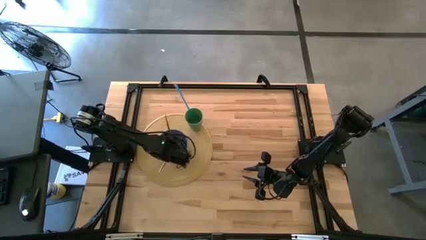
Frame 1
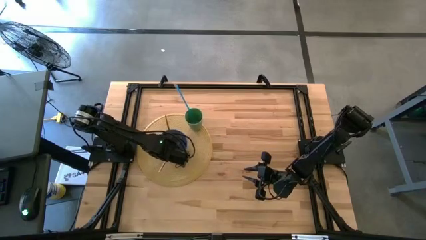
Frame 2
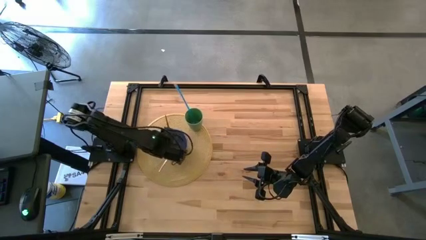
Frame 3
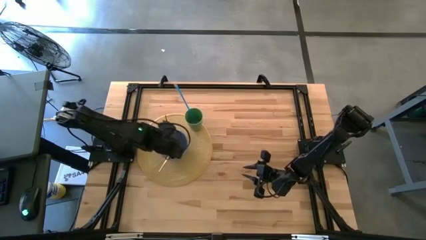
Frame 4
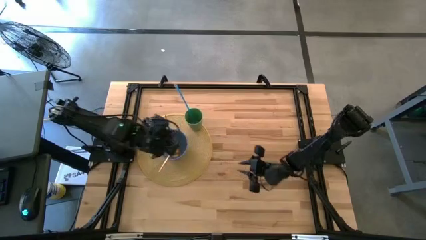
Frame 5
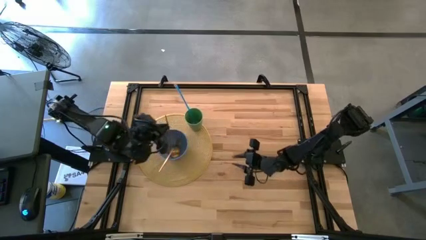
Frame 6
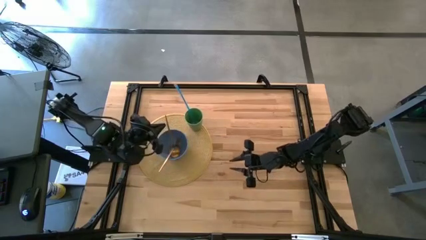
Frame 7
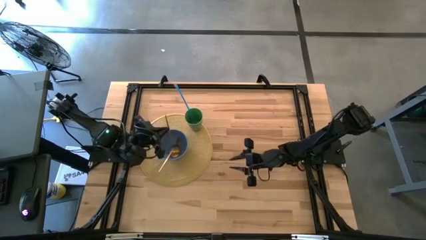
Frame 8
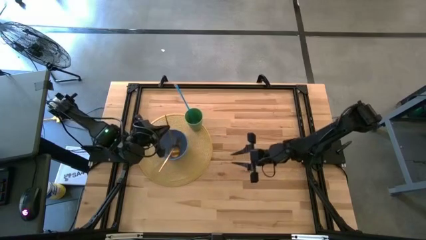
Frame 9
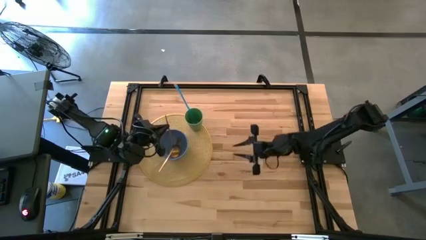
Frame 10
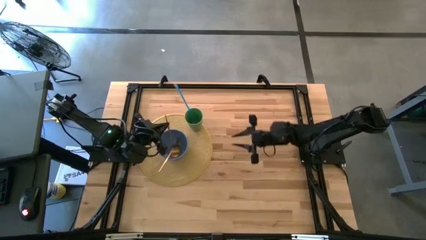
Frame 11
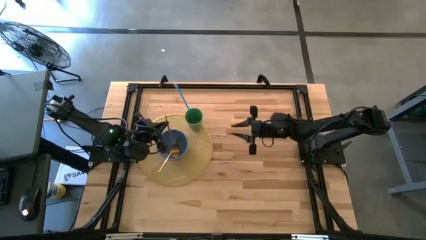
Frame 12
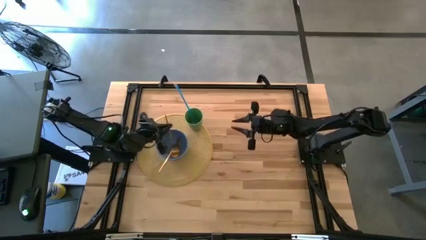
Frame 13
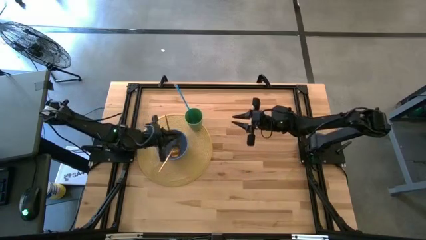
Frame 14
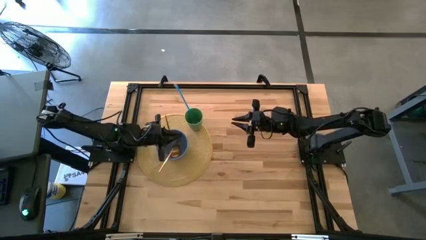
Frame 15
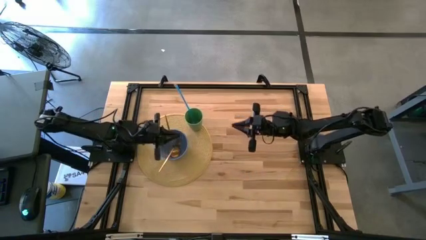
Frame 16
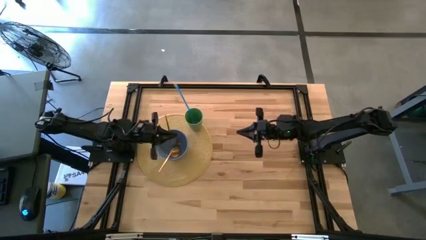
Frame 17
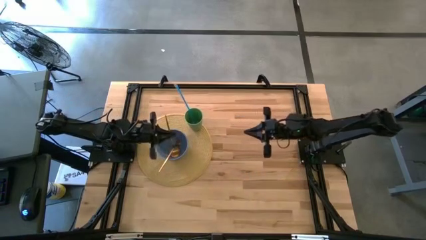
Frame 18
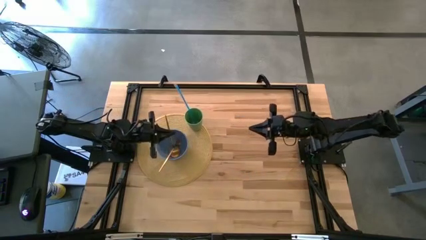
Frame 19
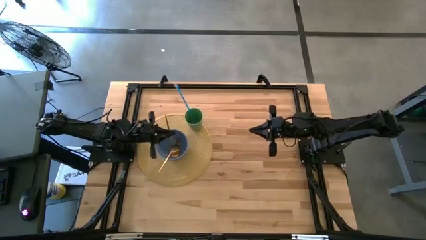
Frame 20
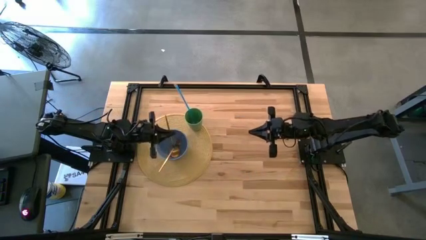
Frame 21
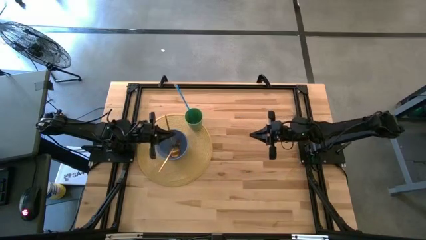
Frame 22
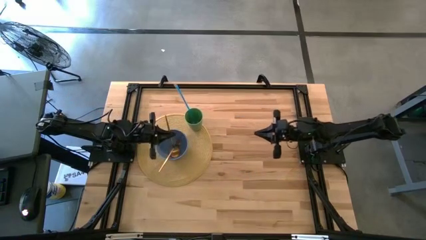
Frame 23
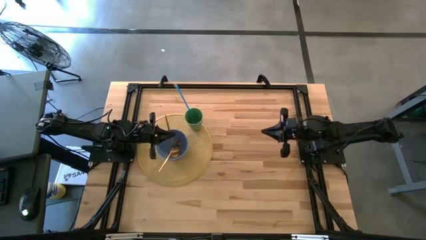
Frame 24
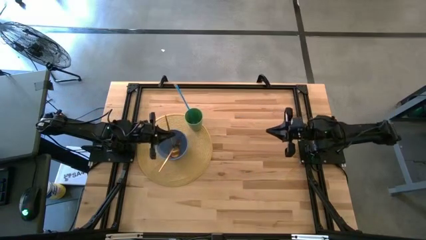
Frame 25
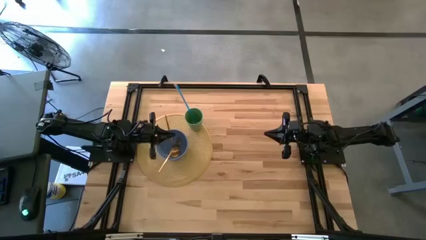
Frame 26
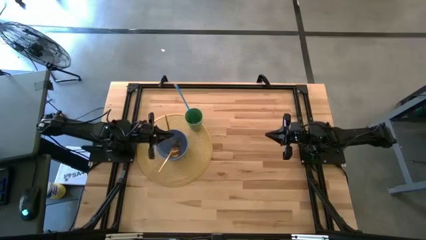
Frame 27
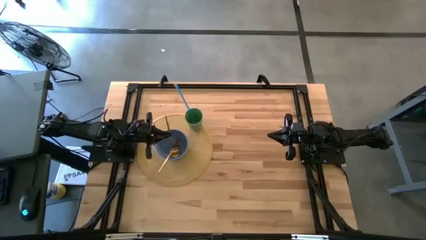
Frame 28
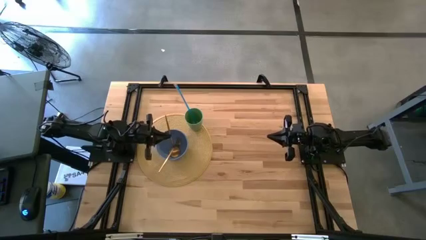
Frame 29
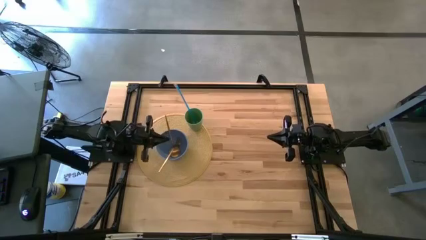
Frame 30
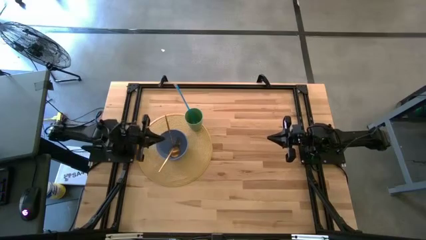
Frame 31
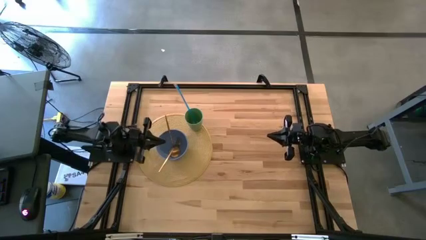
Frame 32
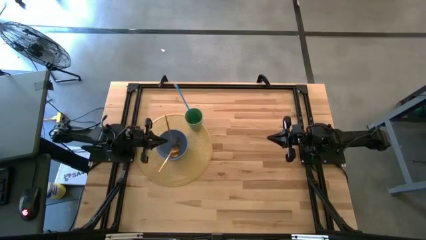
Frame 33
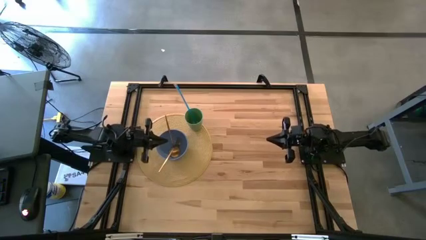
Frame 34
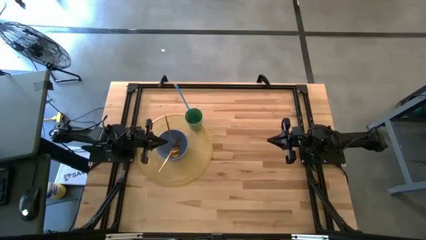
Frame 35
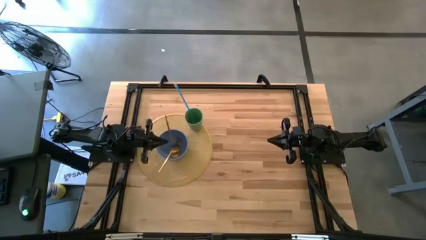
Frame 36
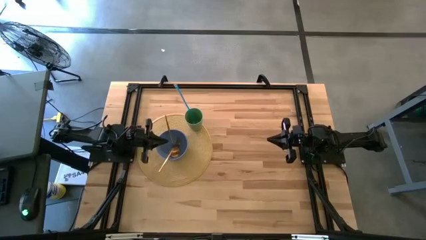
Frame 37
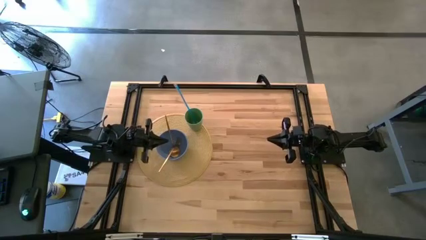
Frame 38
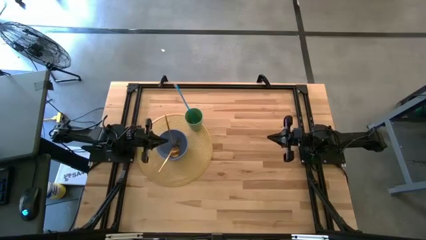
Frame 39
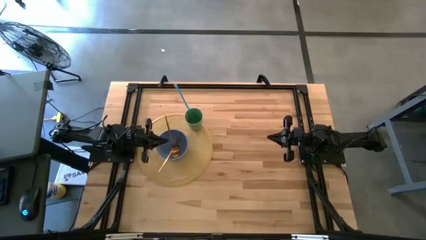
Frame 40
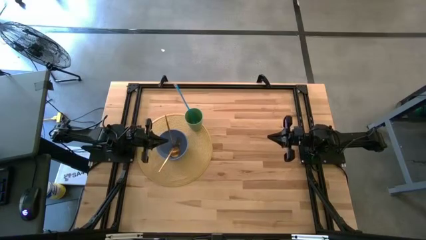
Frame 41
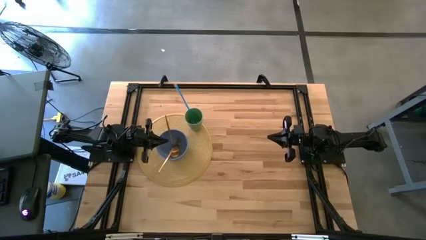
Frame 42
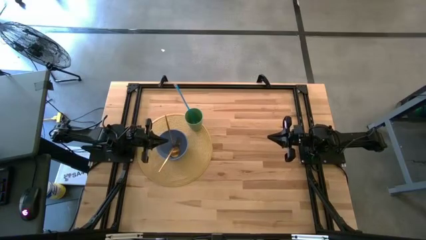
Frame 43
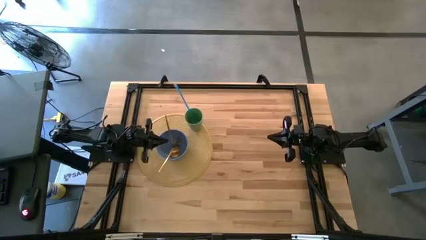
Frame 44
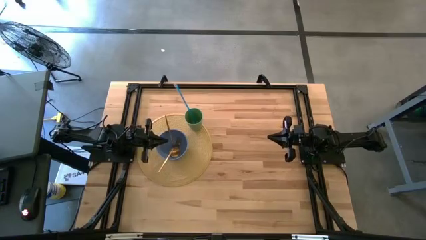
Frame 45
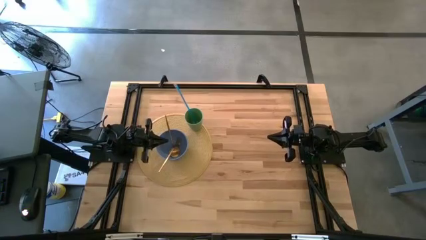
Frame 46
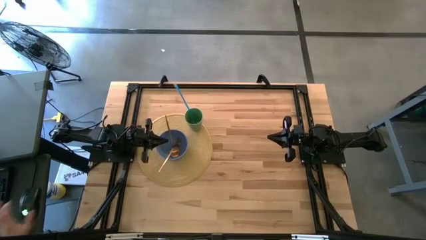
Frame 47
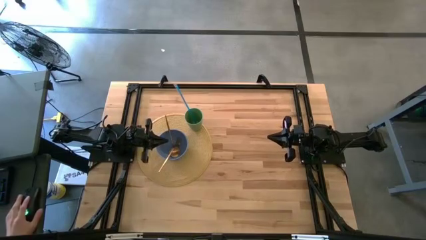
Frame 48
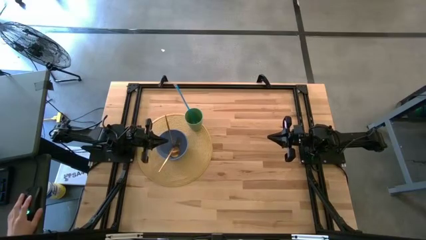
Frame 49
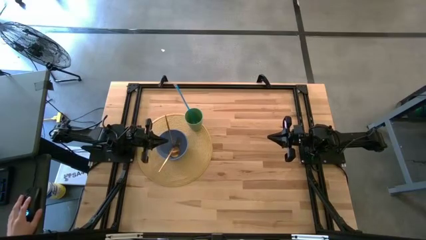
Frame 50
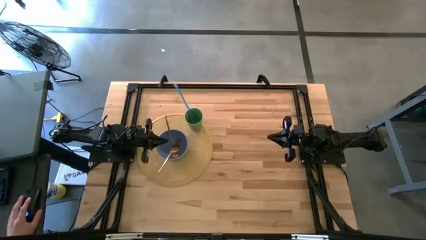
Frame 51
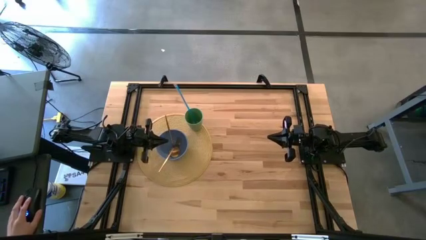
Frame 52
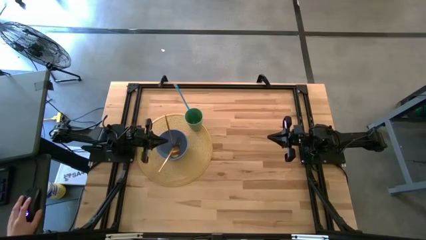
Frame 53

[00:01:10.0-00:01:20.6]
Task: Pick & Place Utensil
Return to Home Position

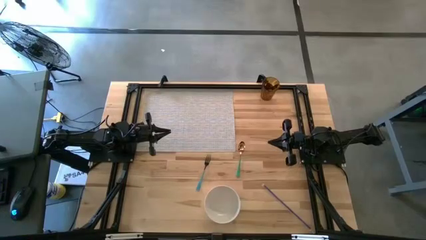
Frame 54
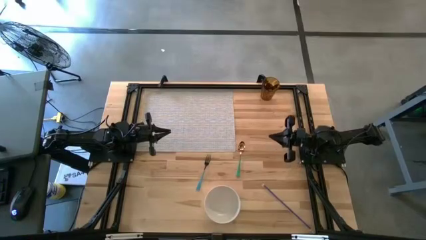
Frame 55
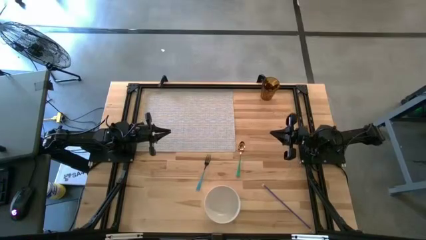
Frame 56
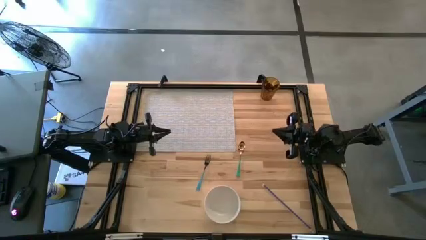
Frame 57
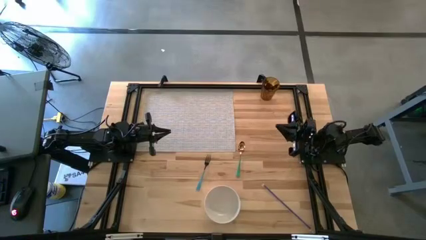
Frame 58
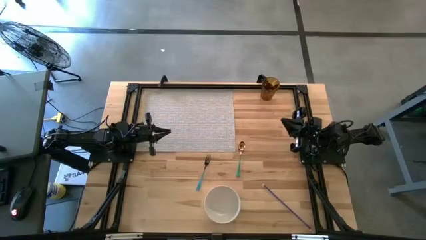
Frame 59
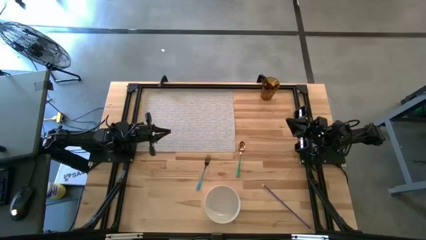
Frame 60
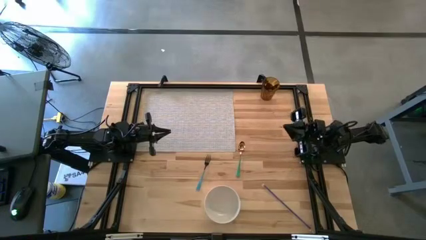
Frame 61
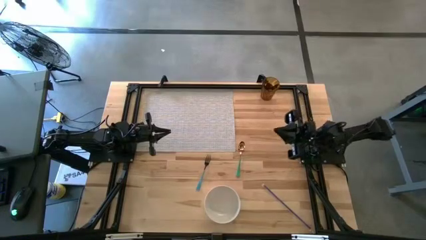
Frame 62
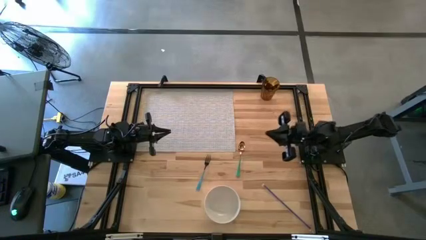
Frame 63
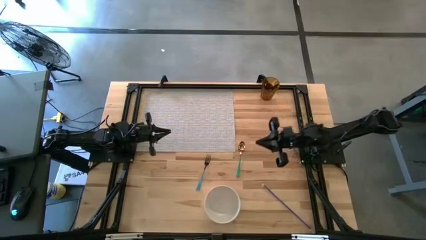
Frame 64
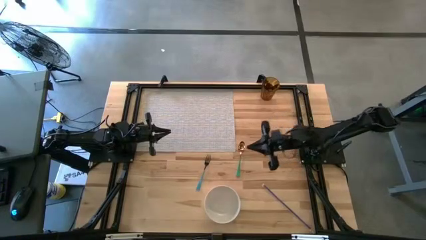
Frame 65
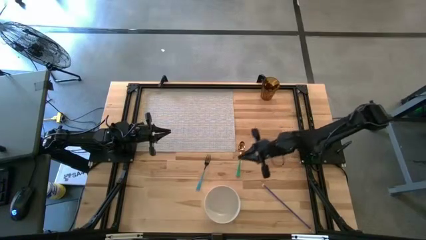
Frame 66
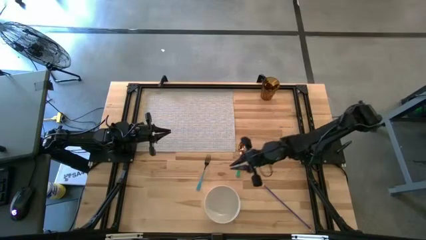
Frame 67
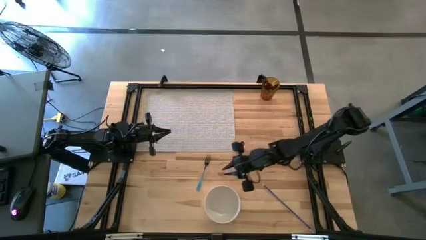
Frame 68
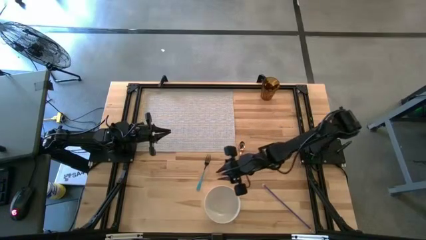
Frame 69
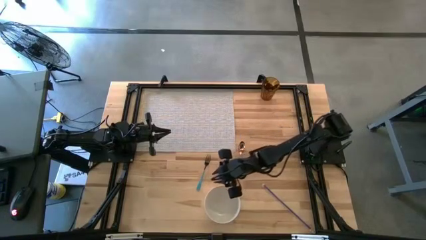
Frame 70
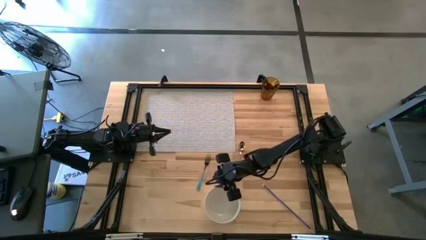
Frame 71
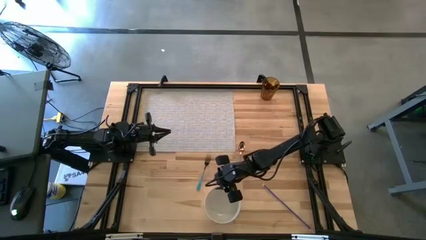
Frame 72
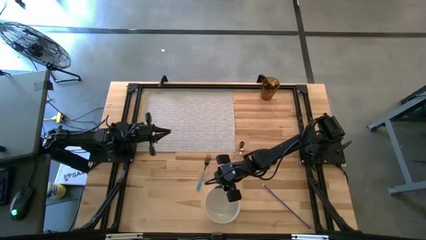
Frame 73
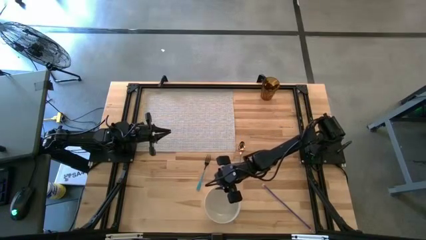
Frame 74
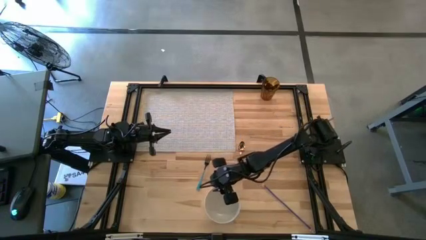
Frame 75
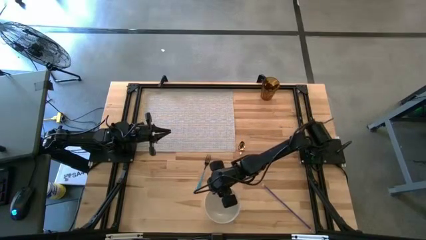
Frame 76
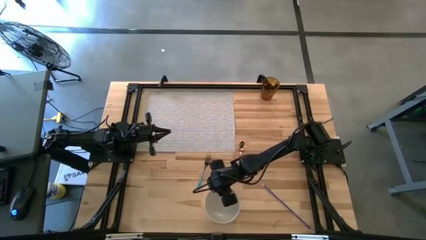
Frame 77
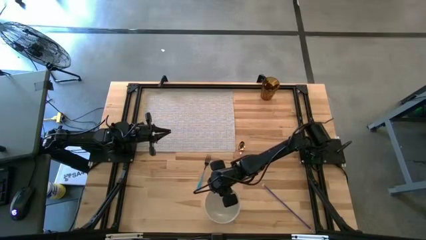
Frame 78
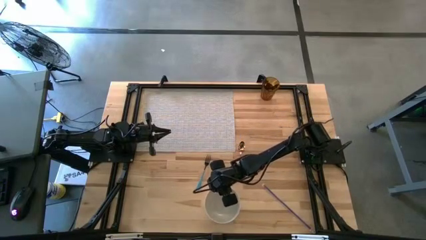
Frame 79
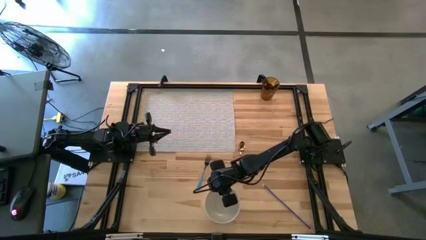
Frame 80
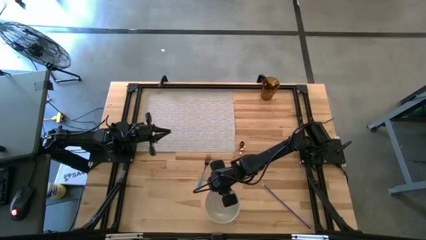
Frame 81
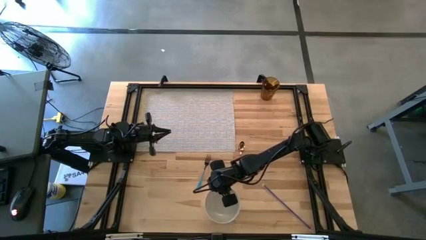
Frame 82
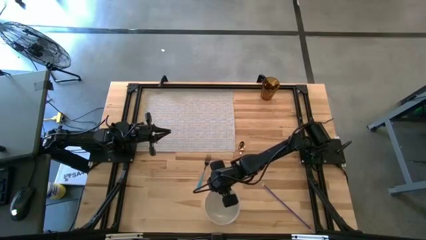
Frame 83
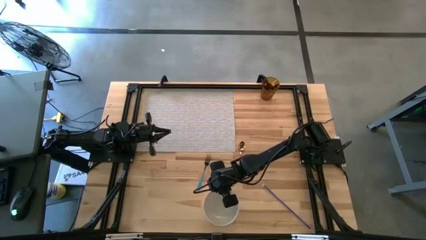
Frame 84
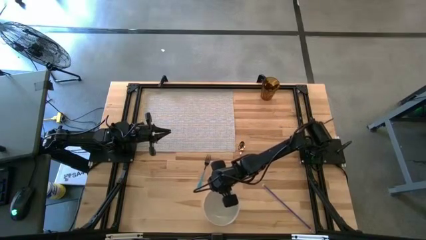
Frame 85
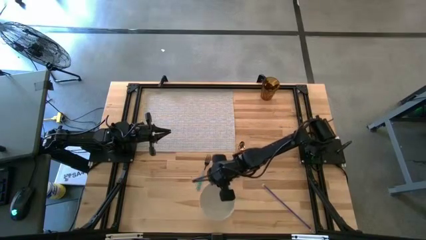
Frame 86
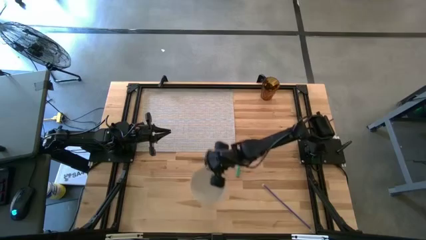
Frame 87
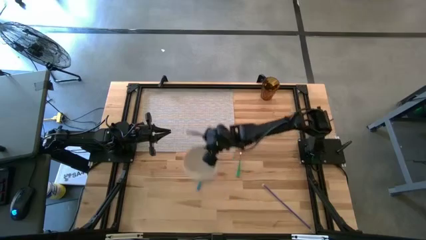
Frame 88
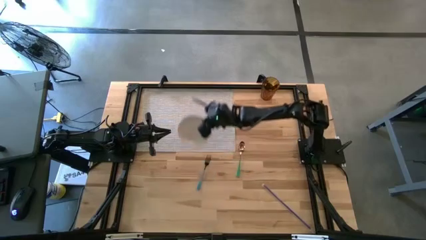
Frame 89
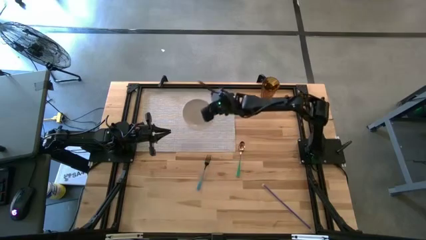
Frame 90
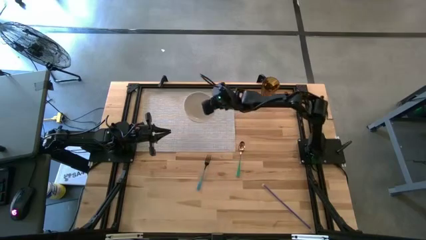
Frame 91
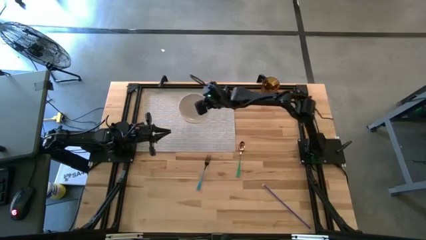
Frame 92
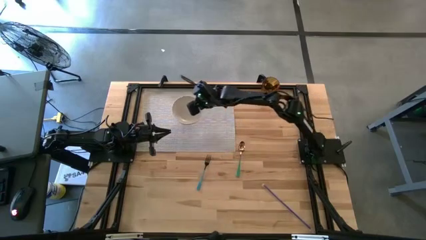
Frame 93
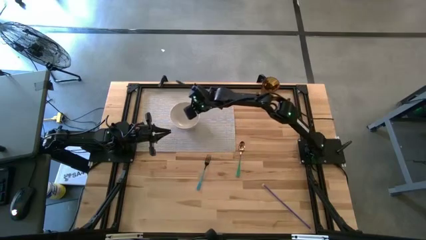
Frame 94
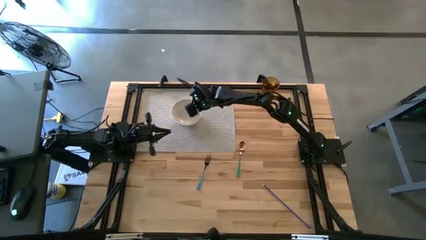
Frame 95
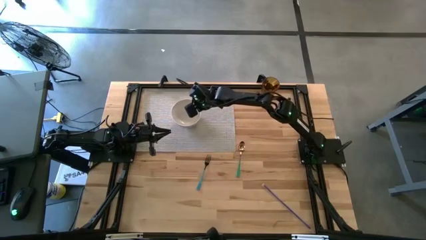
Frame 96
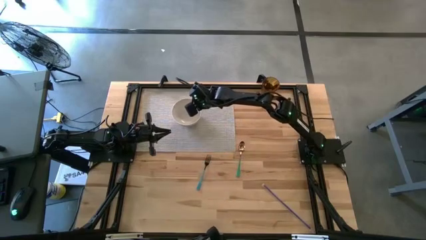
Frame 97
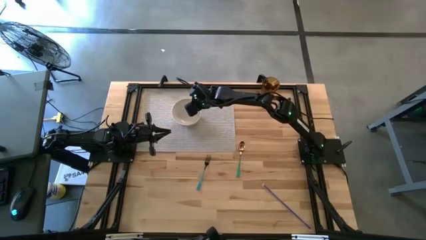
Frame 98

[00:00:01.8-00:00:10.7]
Task: Pick & Place Utensil
Put the white bowl on the gray mat
